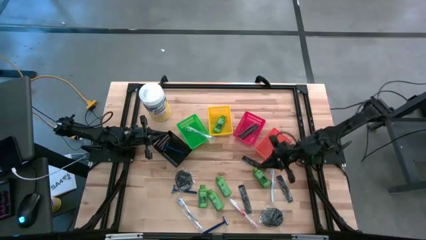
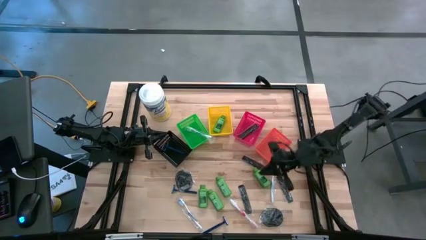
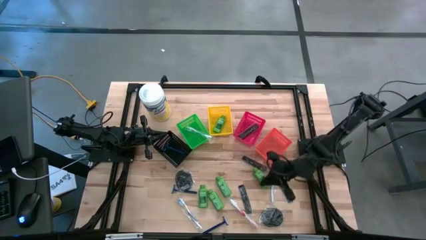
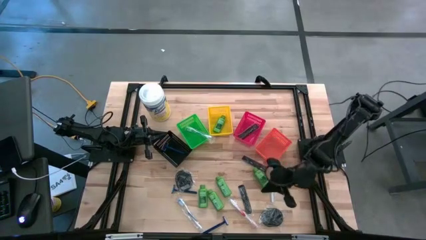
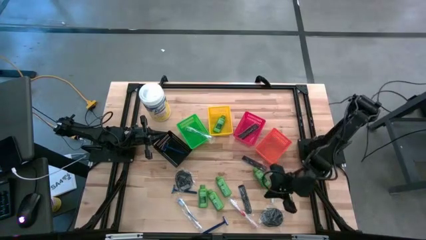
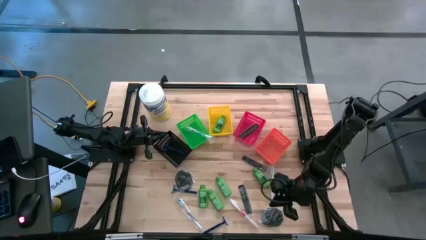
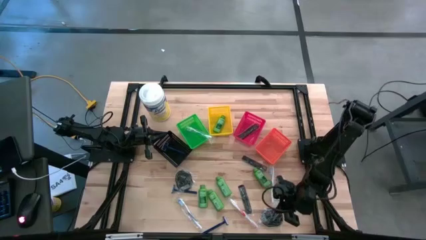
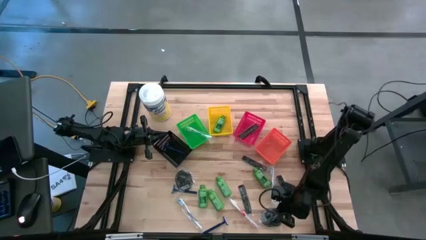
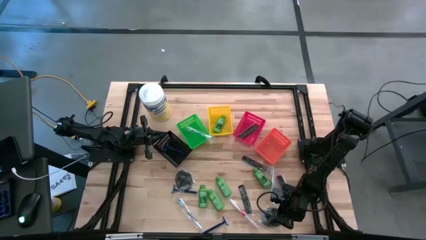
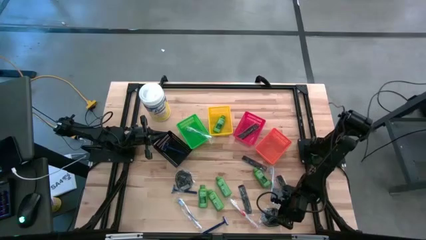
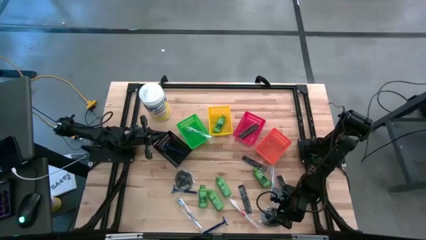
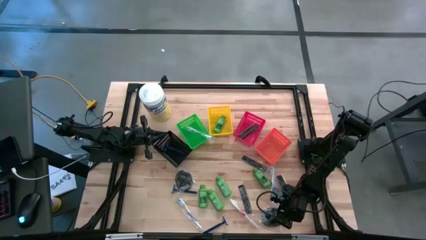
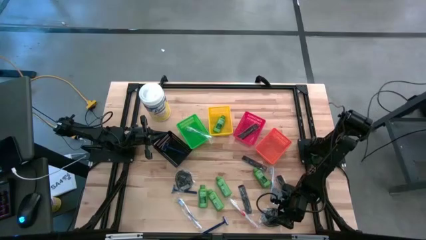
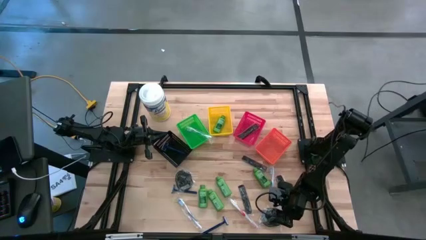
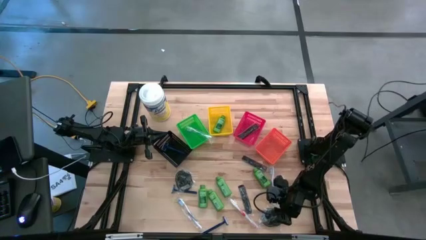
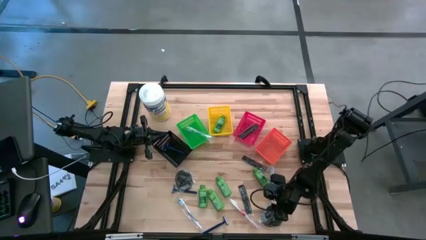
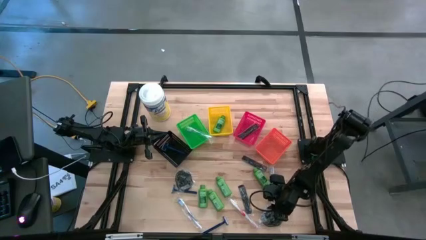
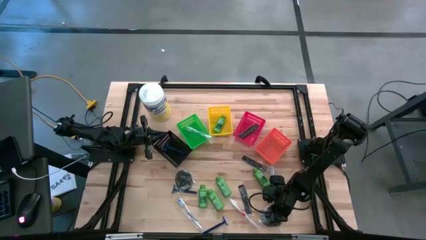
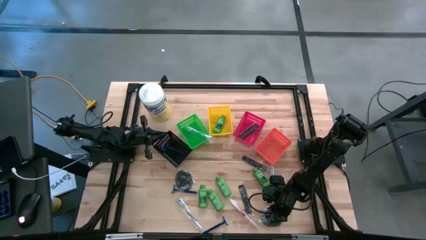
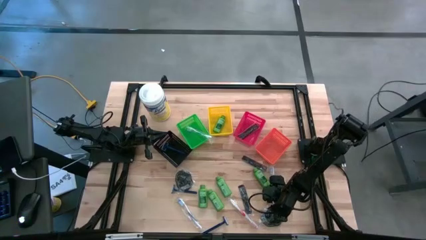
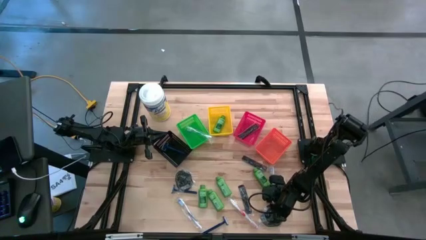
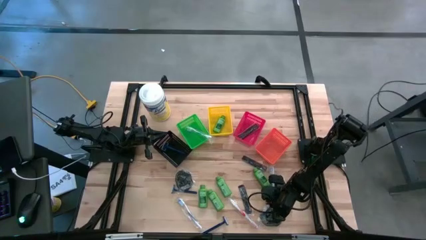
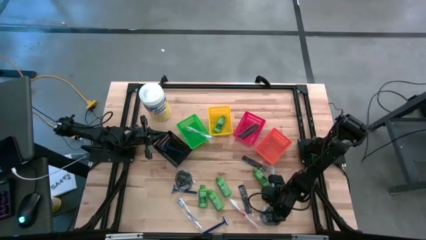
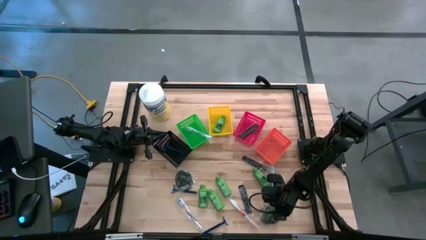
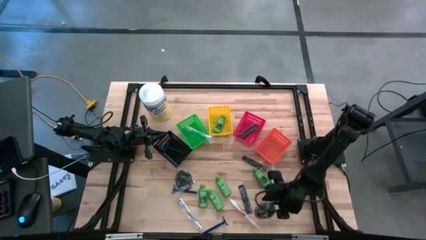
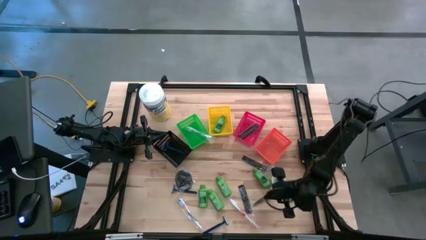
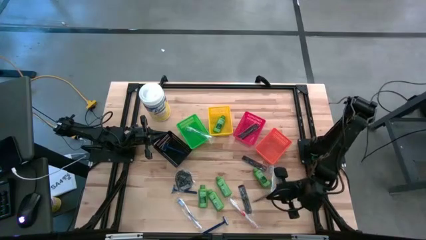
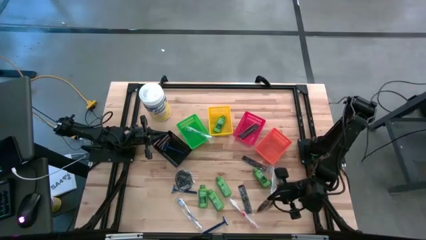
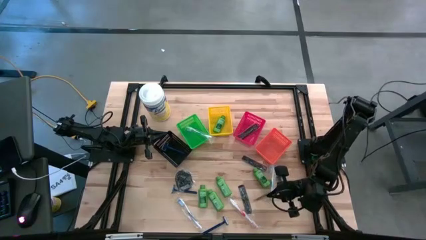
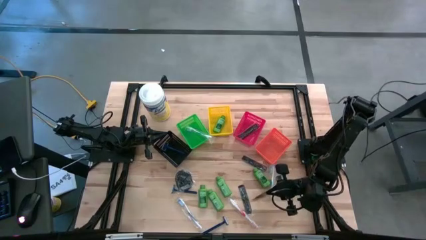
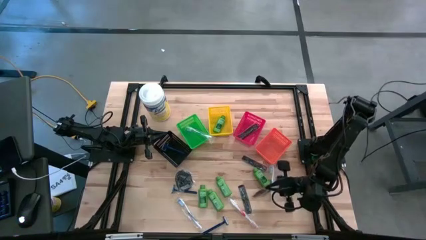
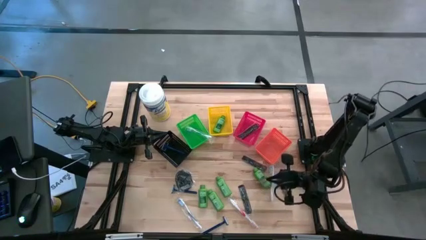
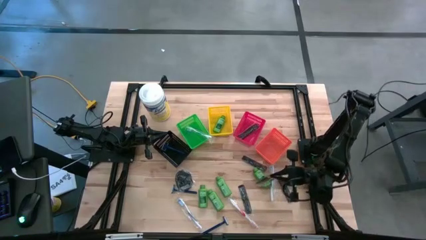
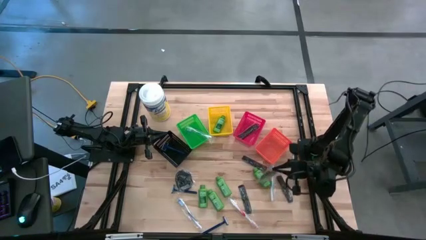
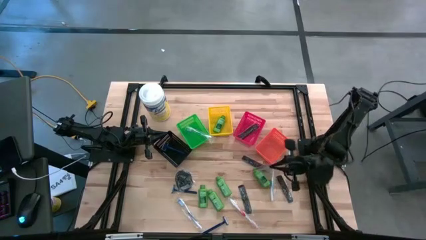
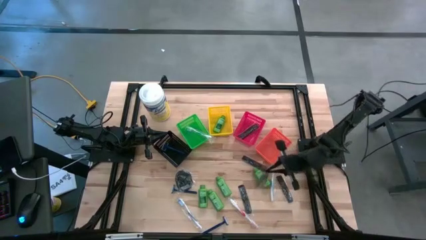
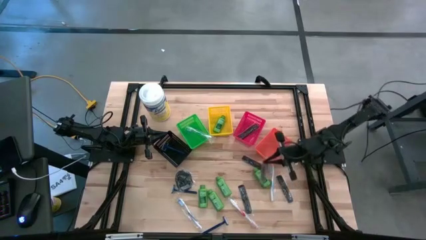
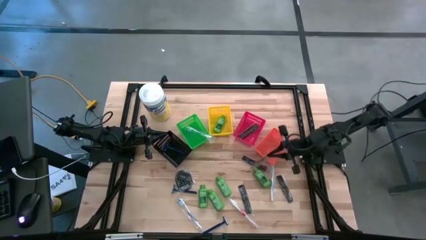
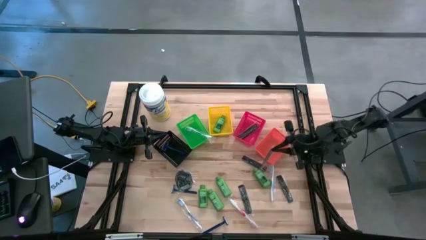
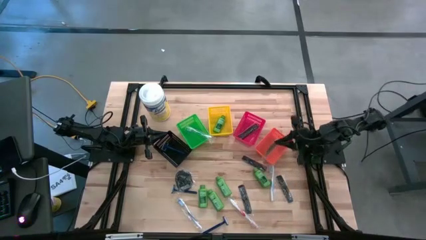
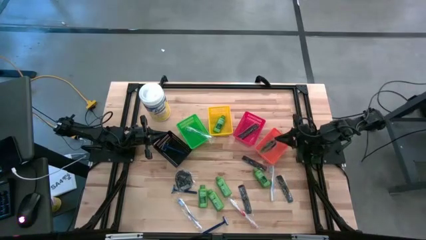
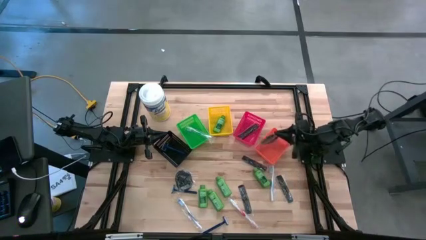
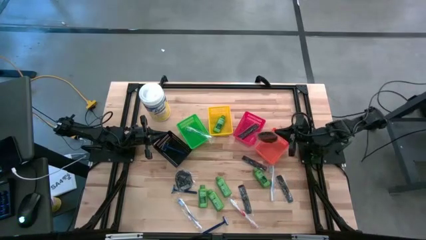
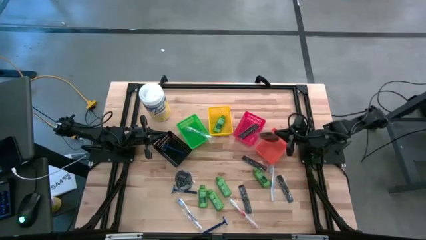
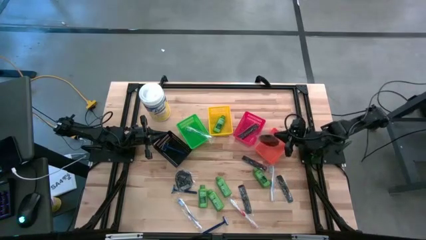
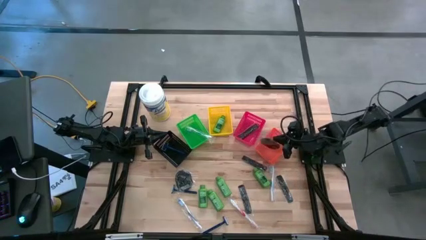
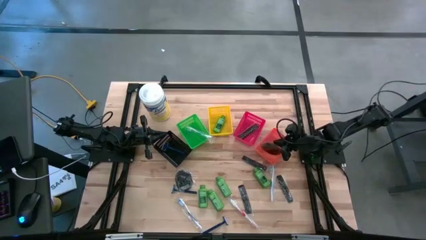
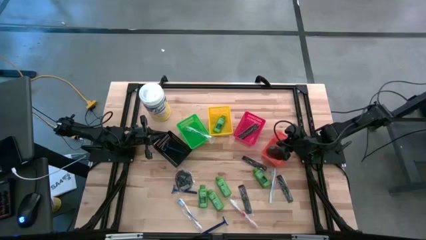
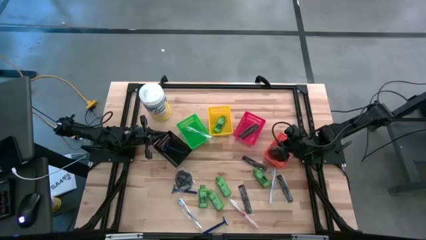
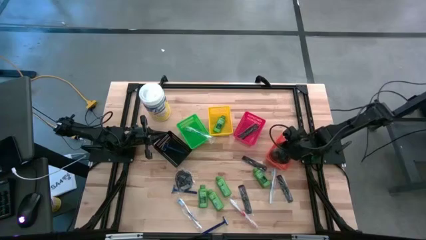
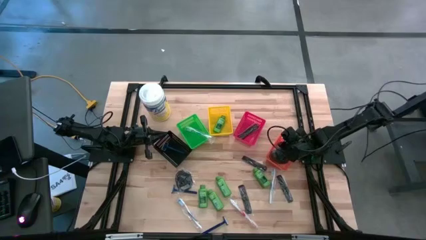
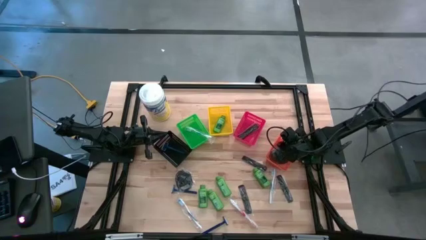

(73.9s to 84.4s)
Task: Pick & Place Travel size toiletries
Put the black hairbrush into the orange bin
